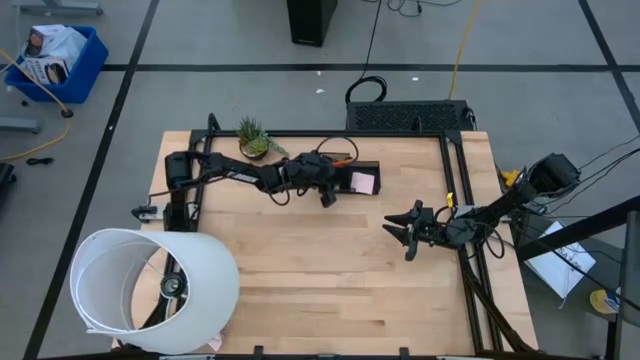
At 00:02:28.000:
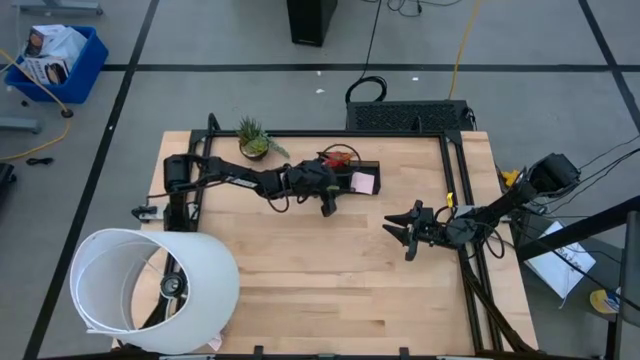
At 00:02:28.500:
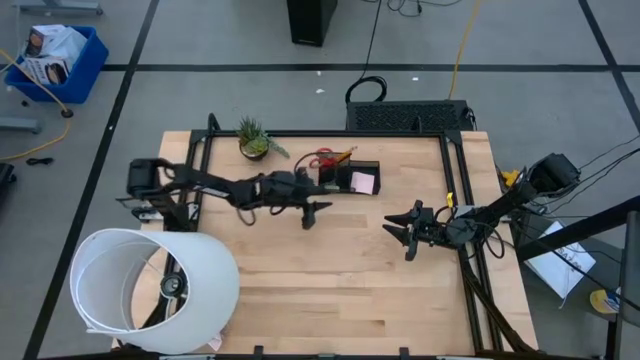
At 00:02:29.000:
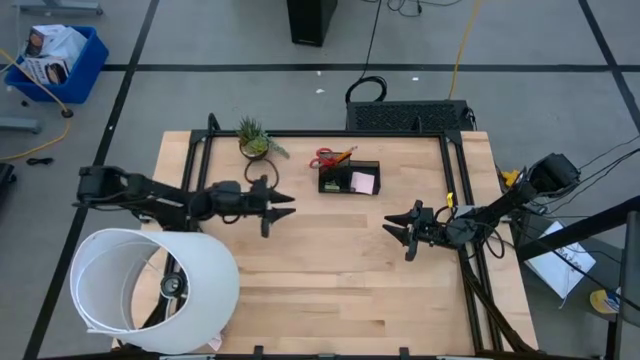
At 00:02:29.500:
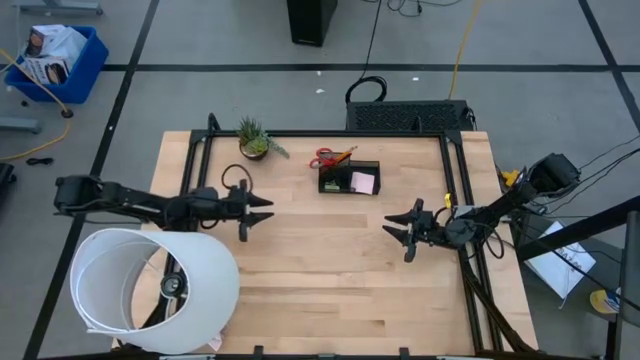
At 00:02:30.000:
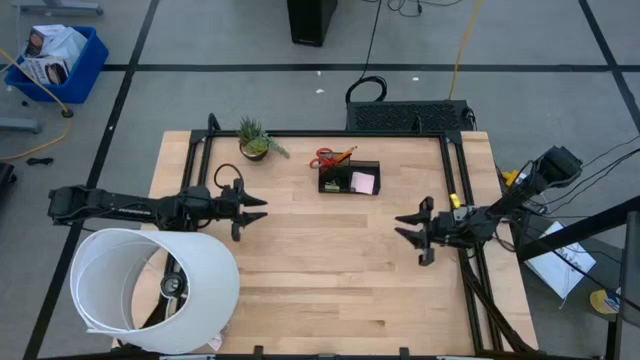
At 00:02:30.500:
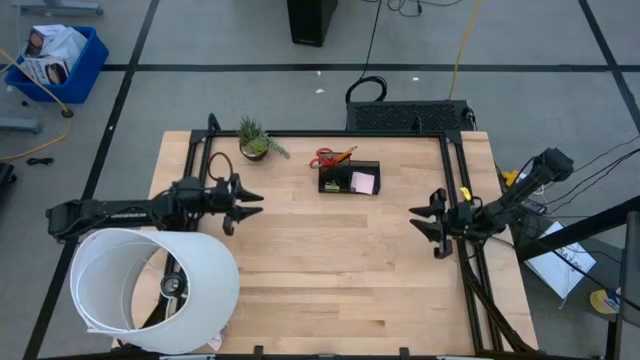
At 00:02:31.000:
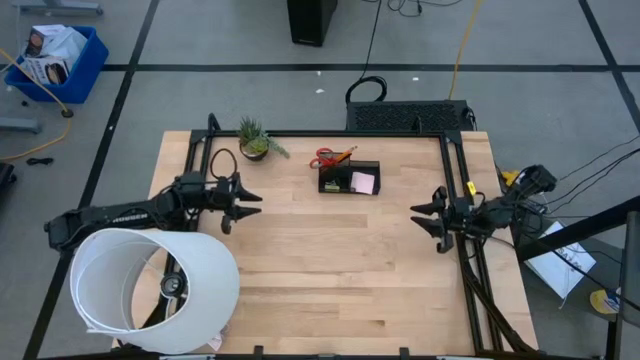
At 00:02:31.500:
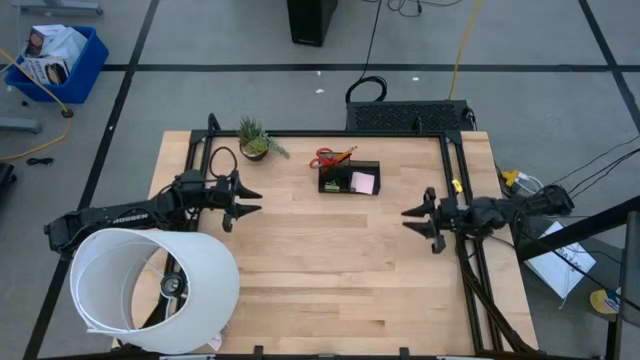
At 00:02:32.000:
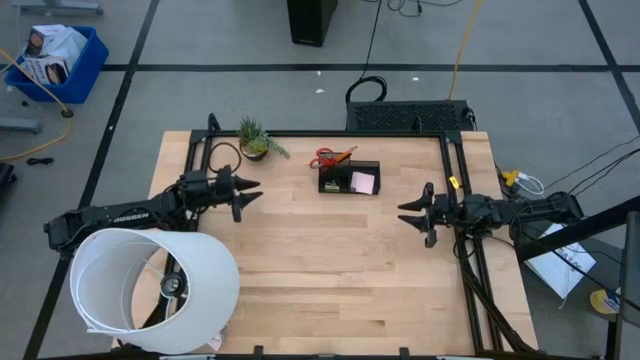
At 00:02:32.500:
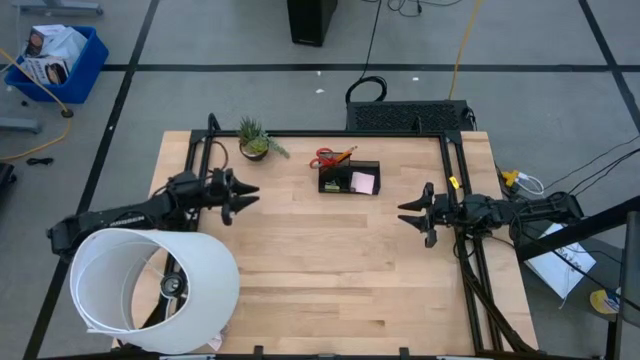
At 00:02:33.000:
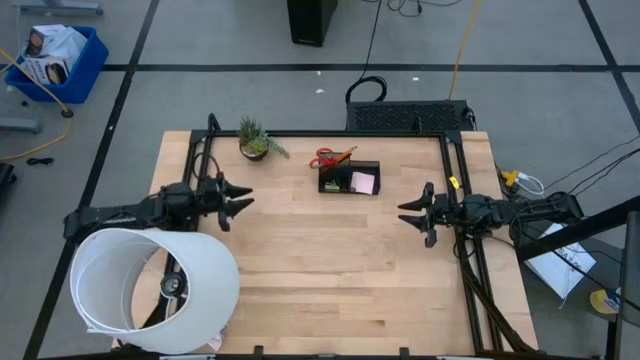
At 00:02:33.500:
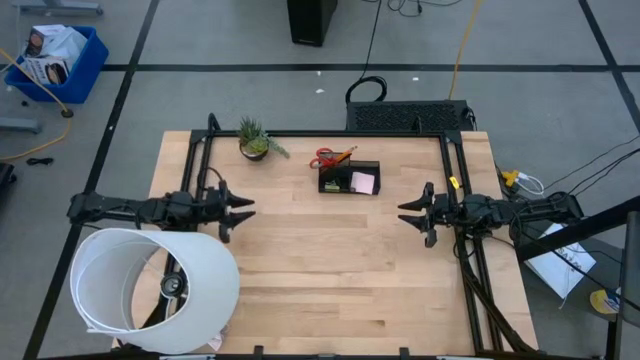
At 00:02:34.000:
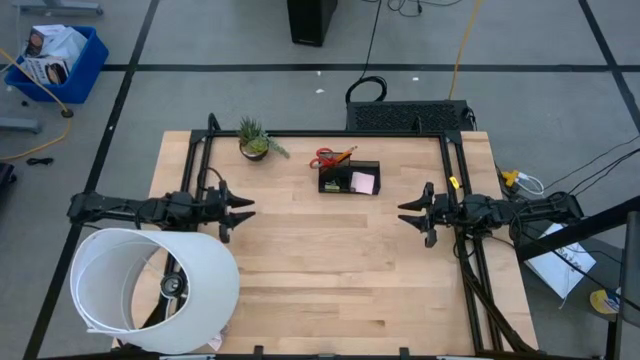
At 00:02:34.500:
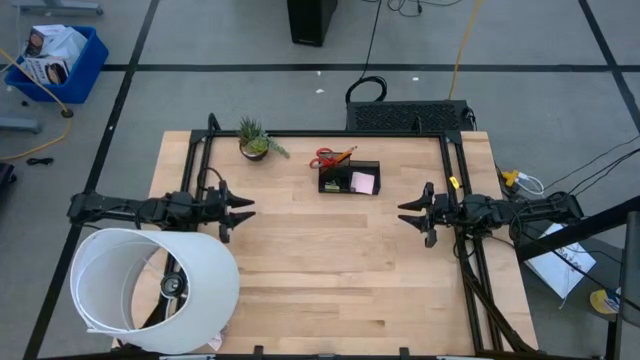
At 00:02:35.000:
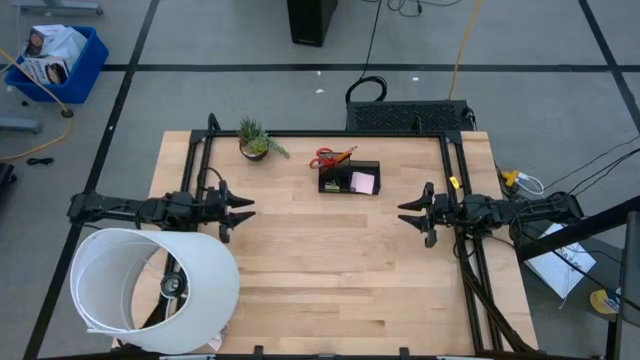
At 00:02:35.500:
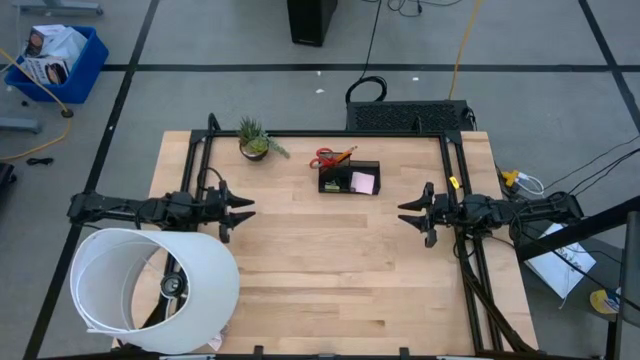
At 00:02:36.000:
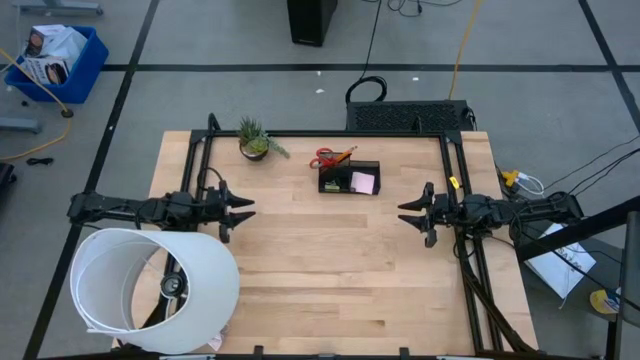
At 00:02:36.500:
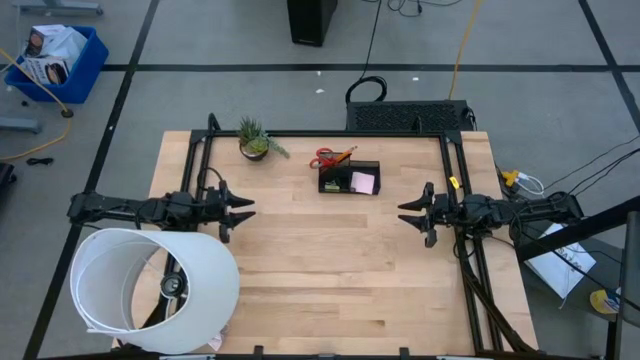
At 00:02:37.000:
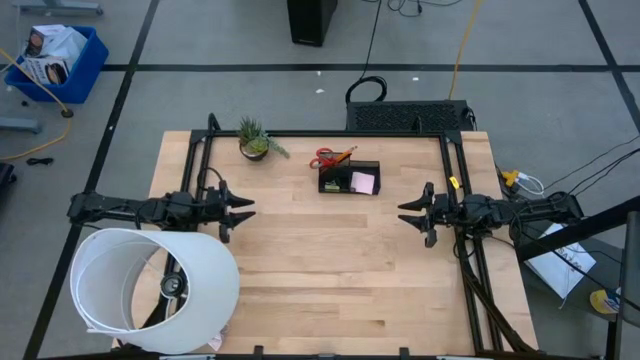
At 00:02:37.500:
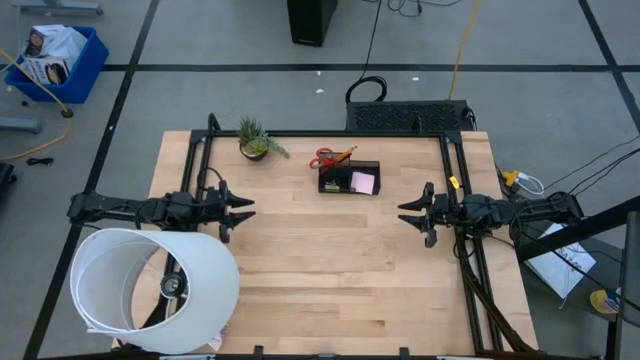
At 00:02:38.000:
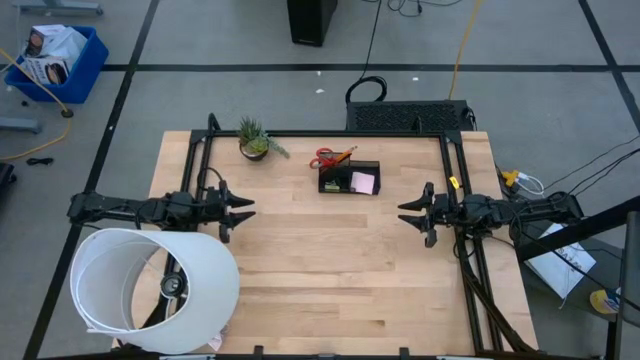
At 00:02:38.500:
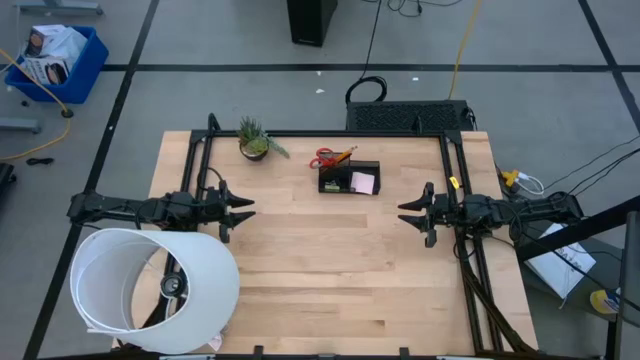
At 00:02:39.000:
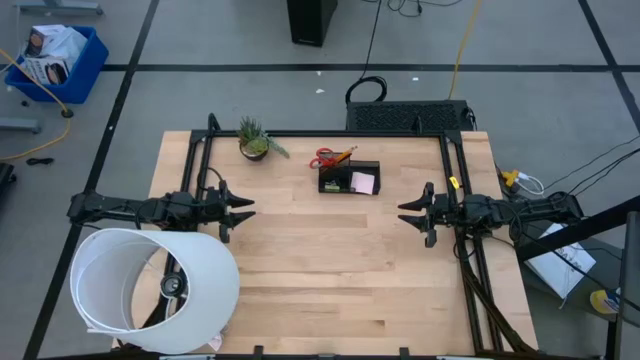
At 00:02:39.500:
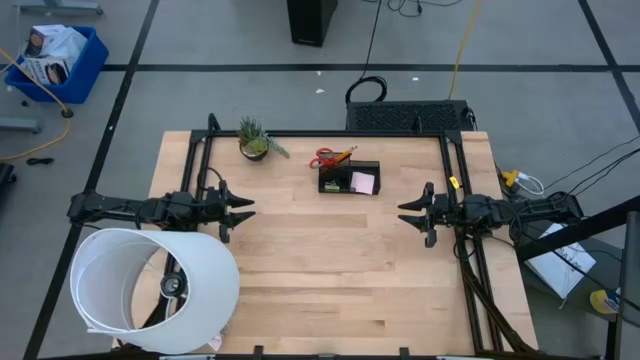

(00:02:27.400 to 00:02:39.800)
Task: Pick and place office supplies into organizer
Return to Home Position
